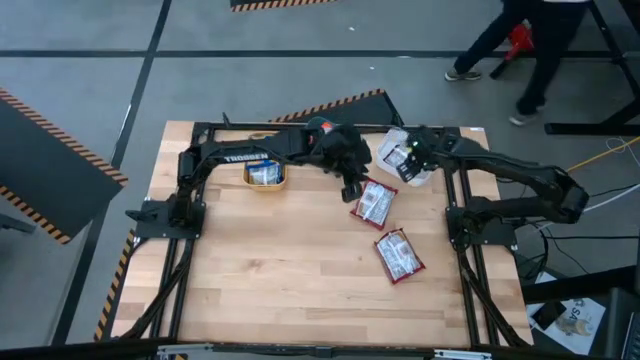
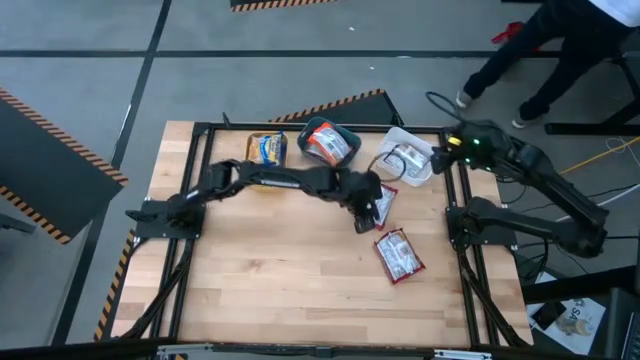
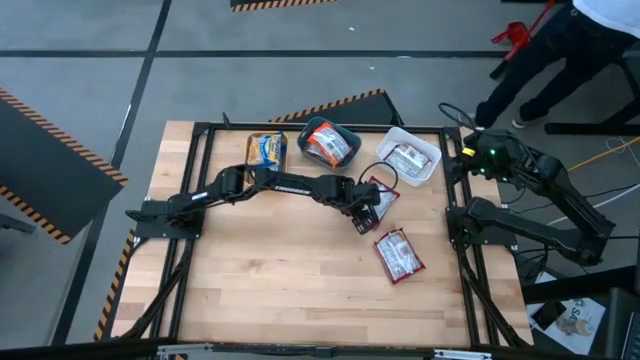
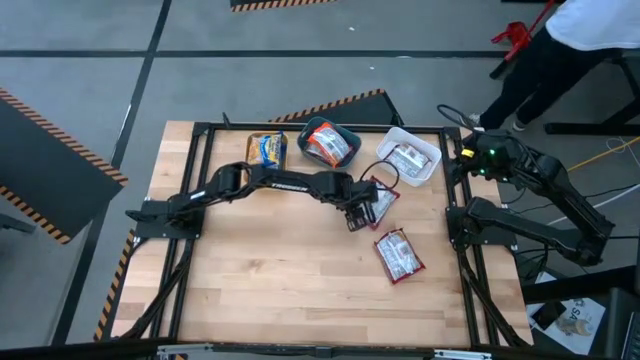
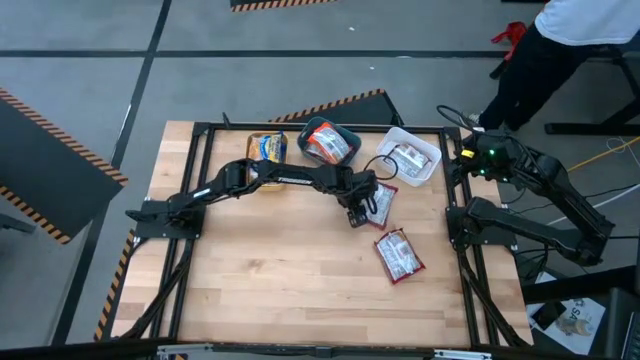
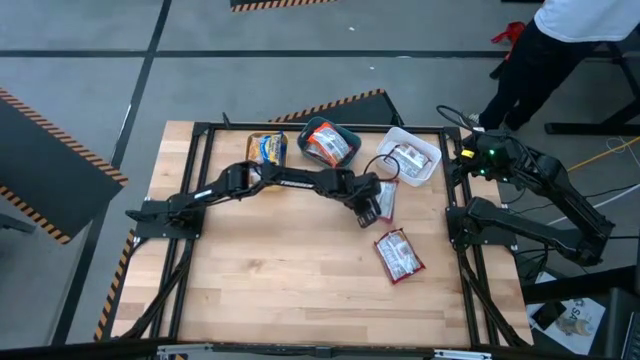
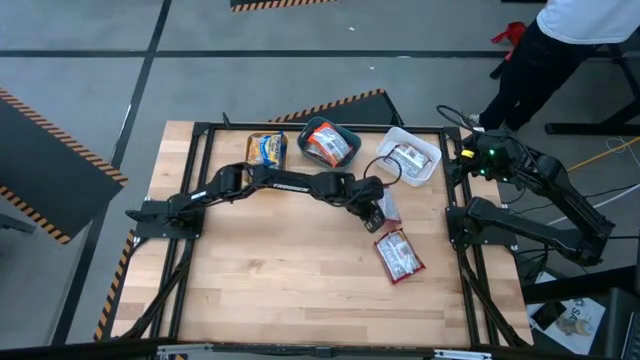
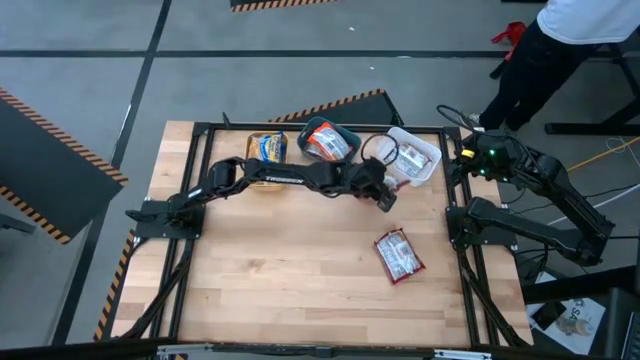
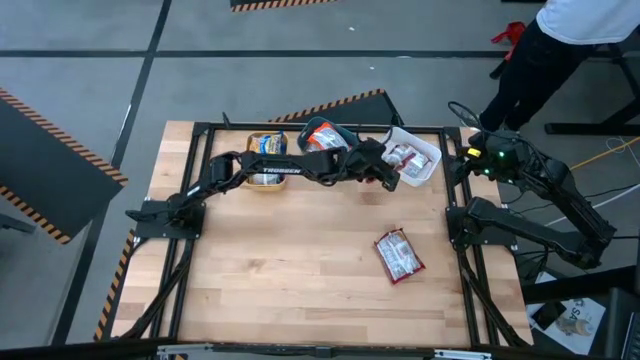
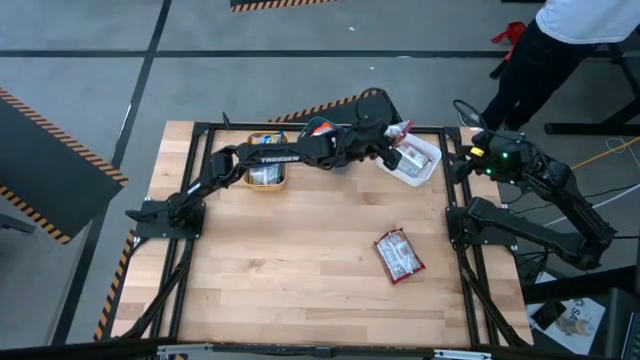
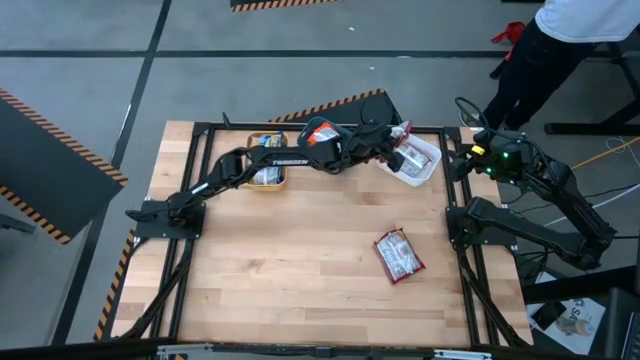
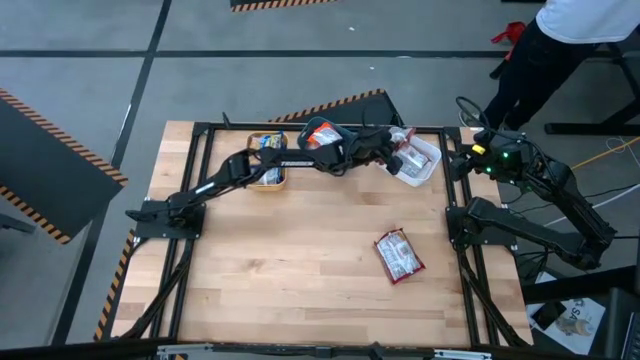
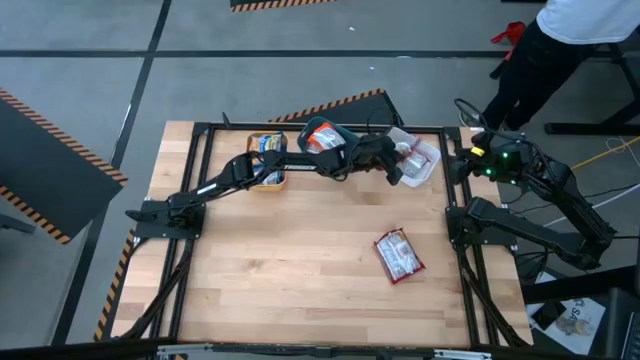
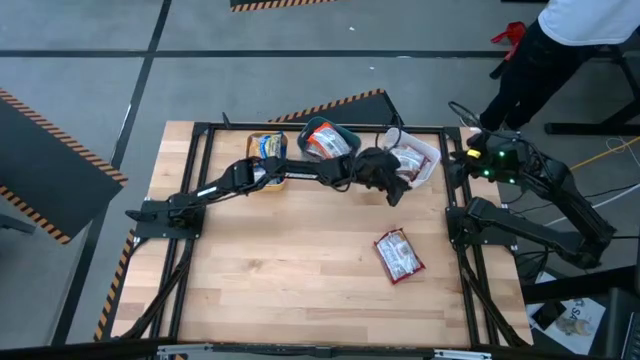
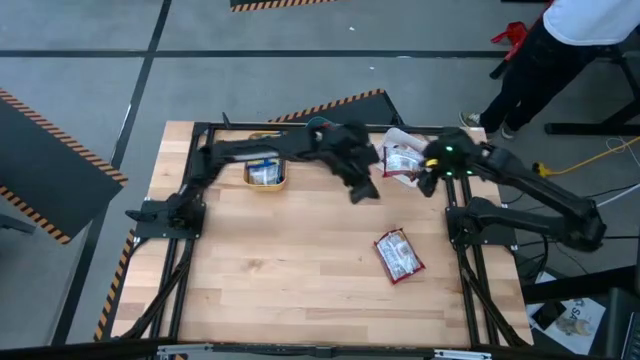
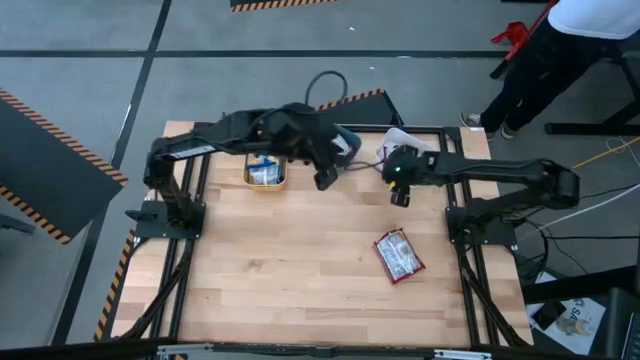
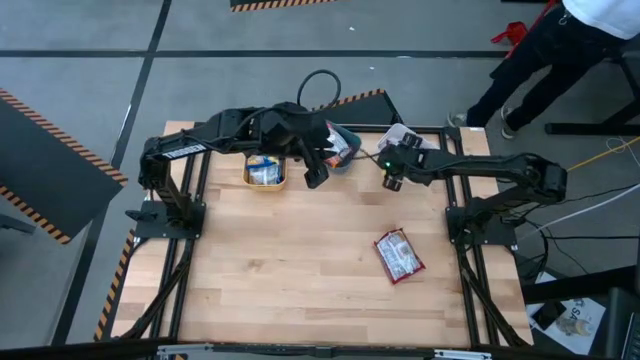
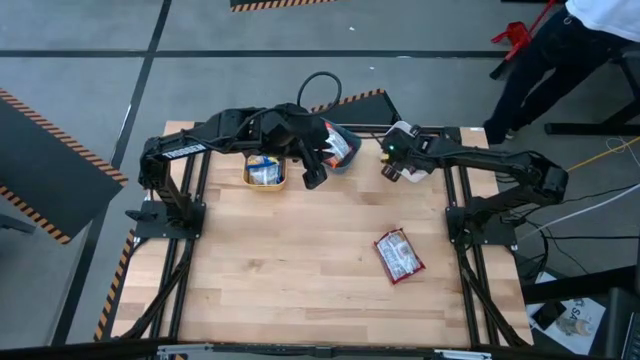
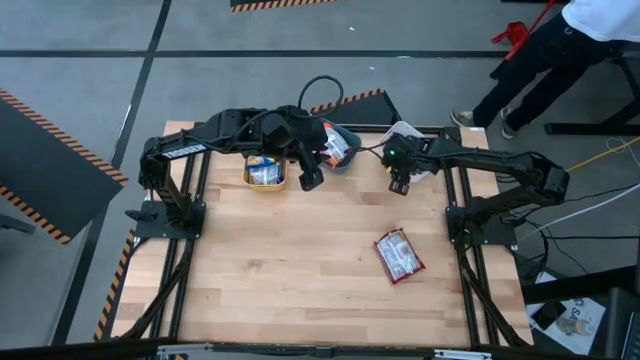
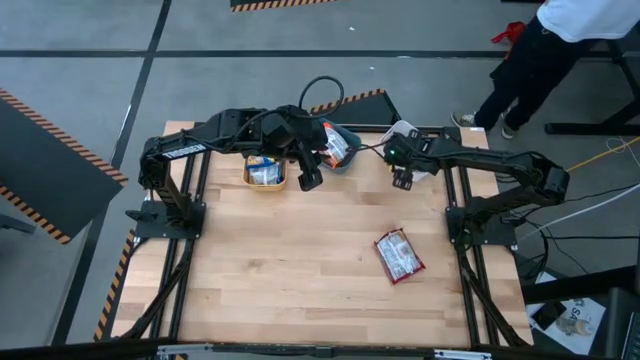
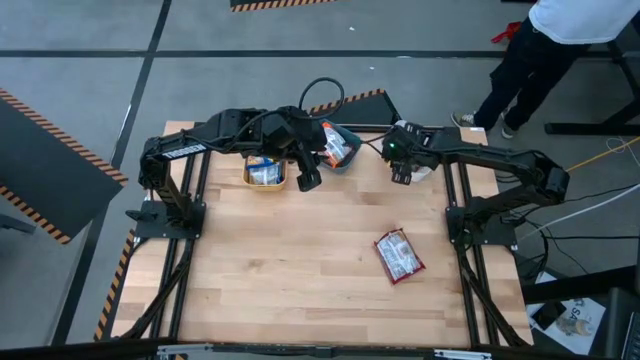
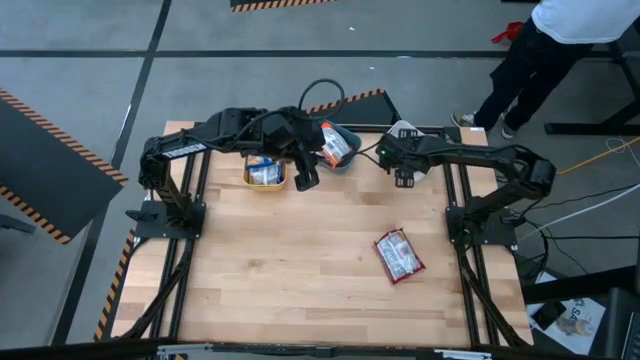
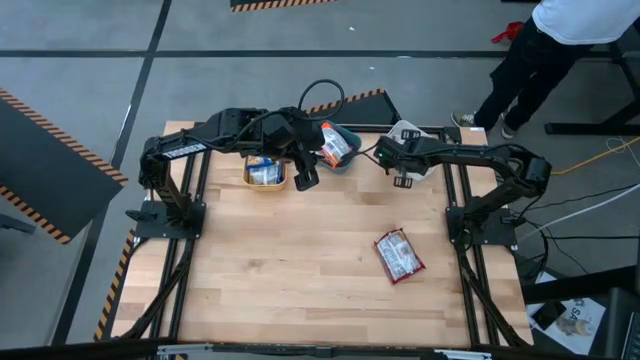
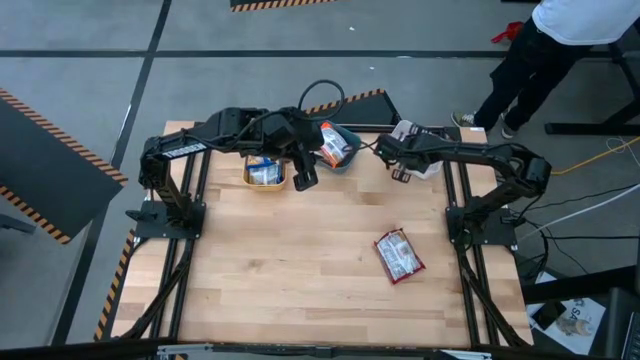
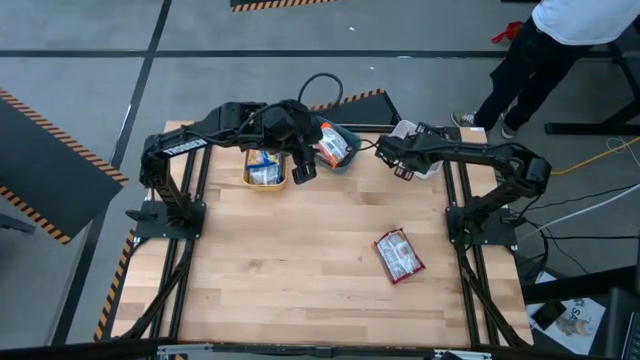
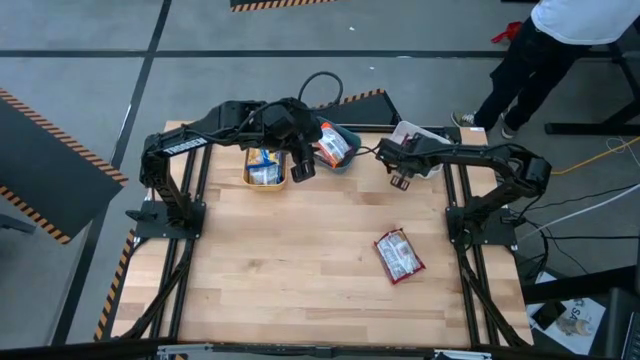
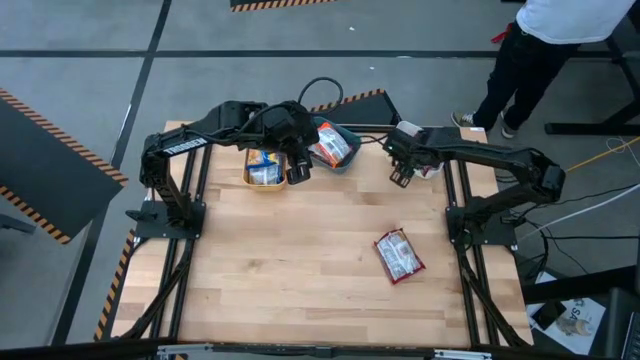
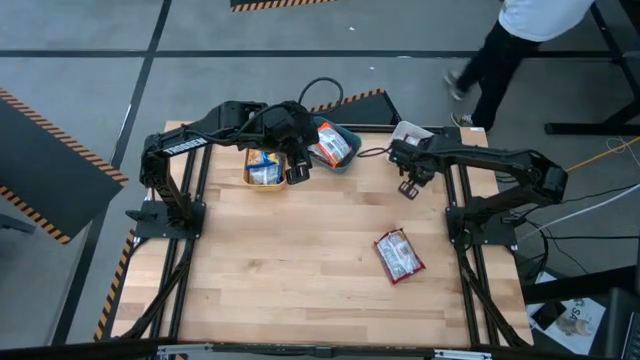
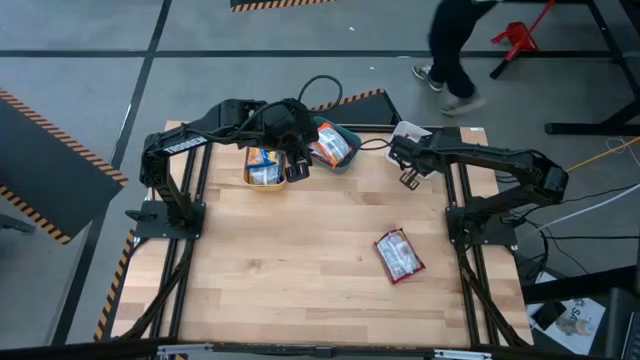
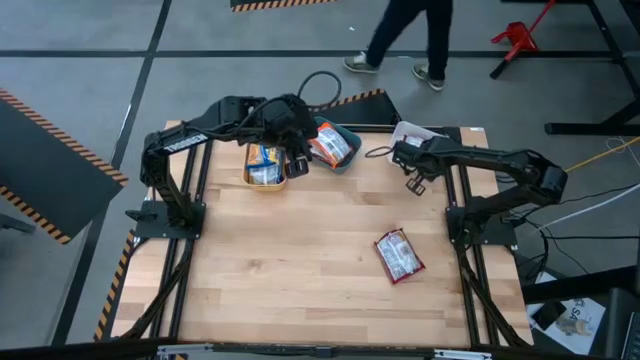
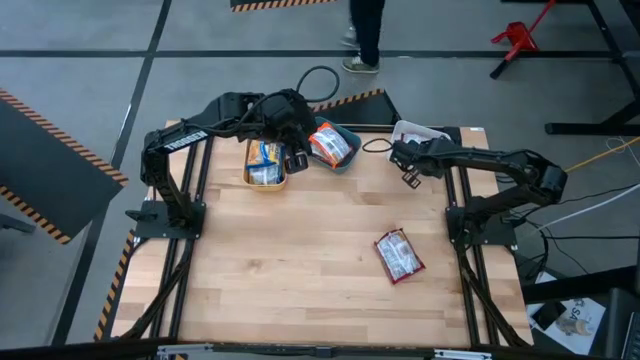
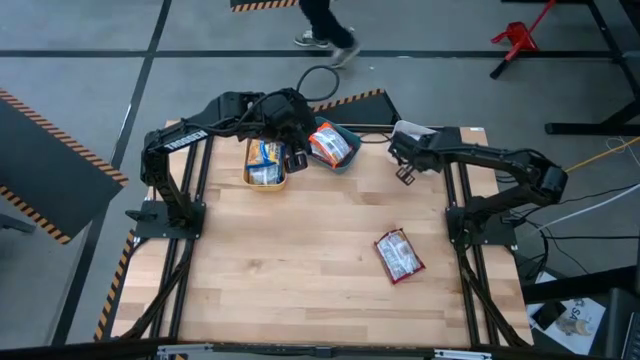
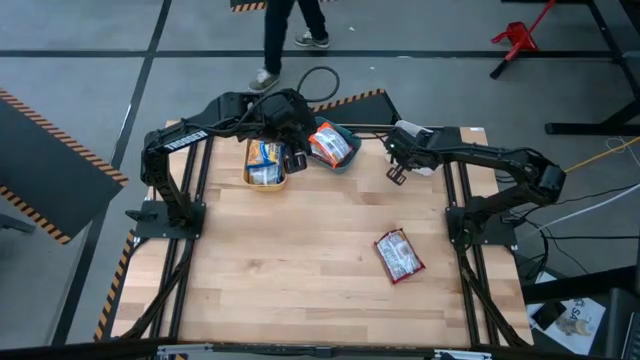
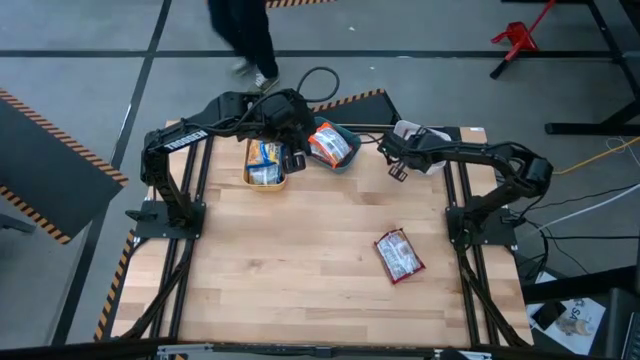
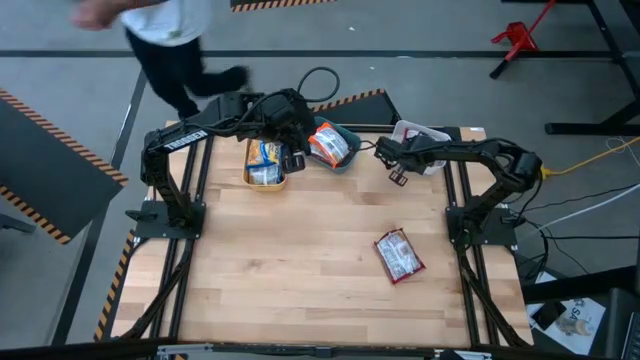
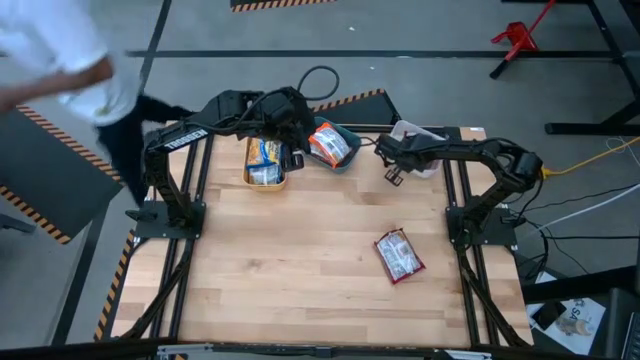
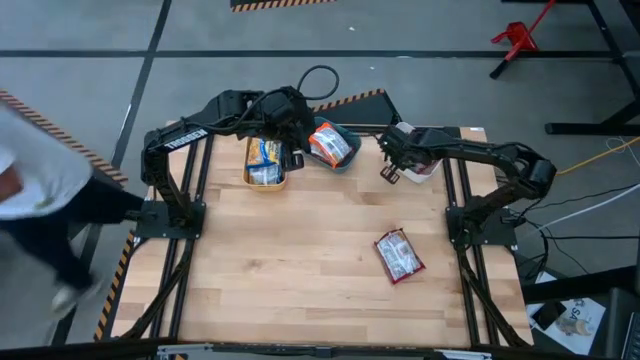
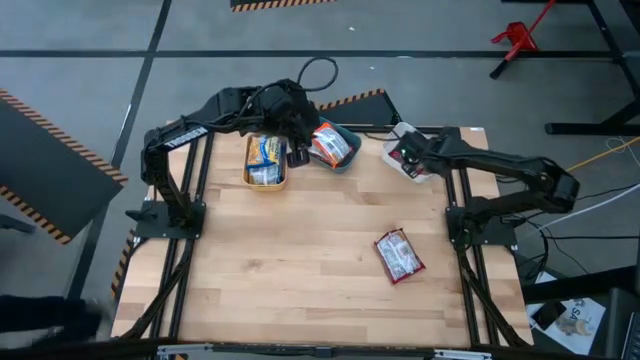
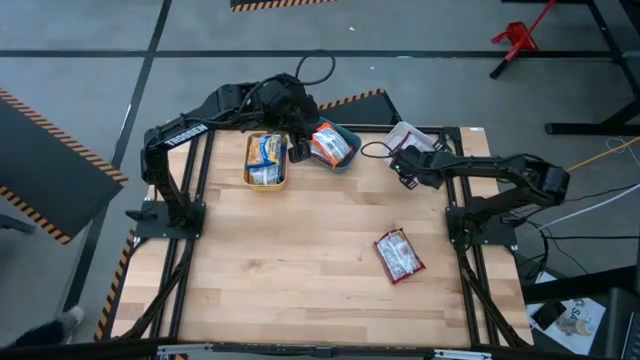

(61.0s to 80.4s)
Task: Sort Maruchan noodles
Put the top red noodle pack into the white bin

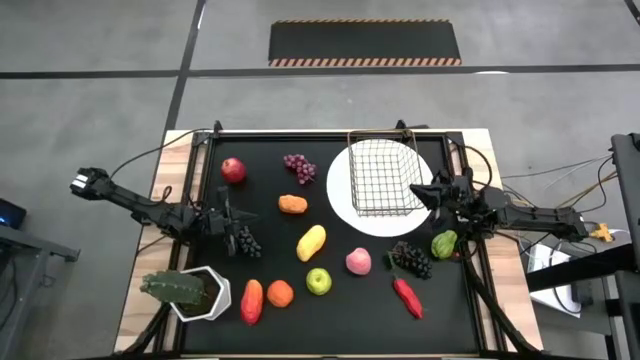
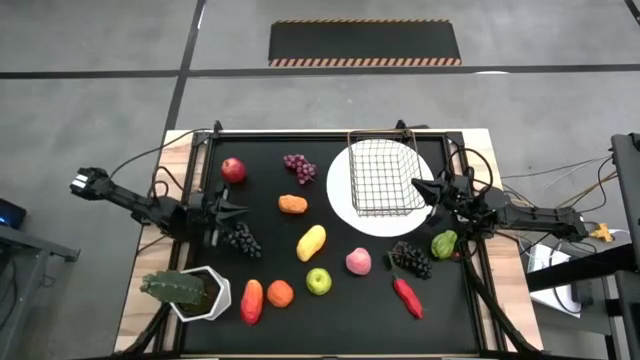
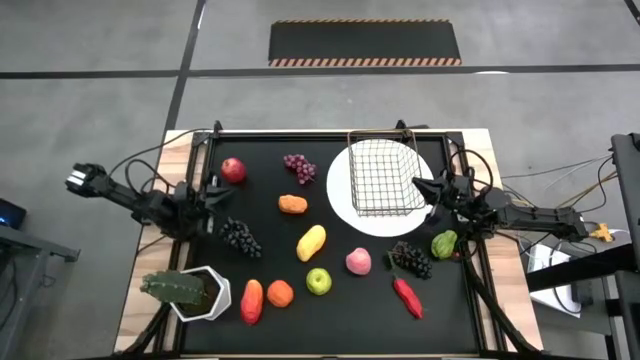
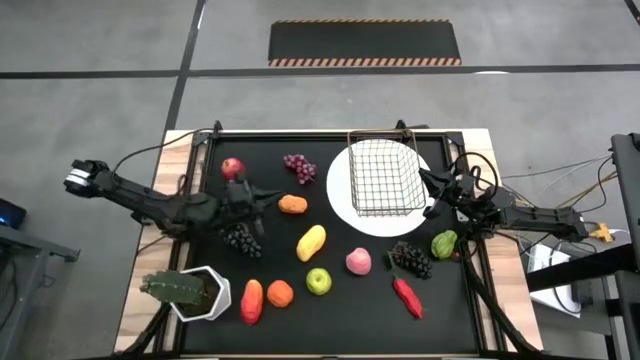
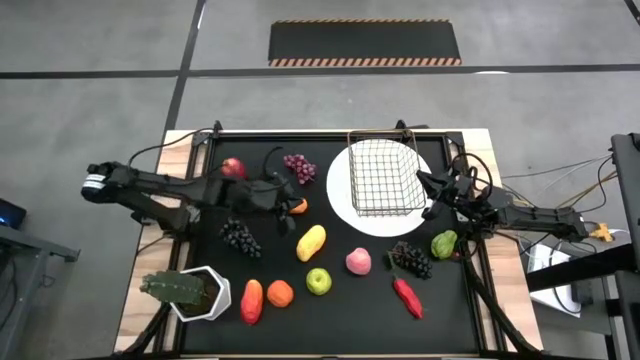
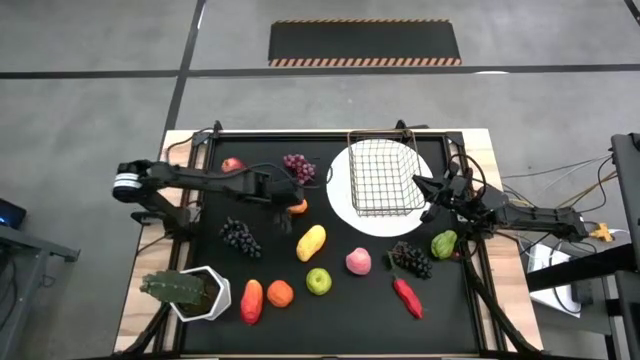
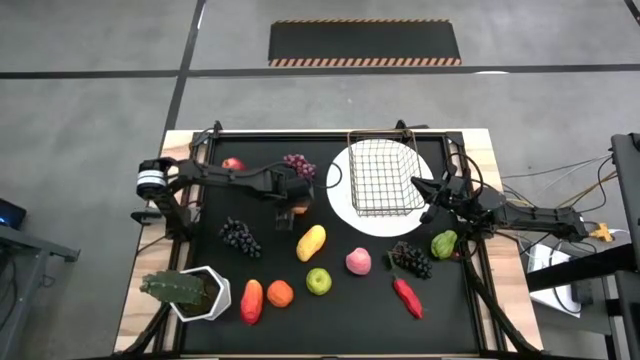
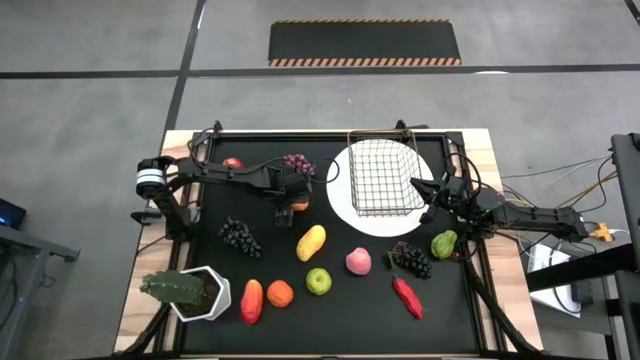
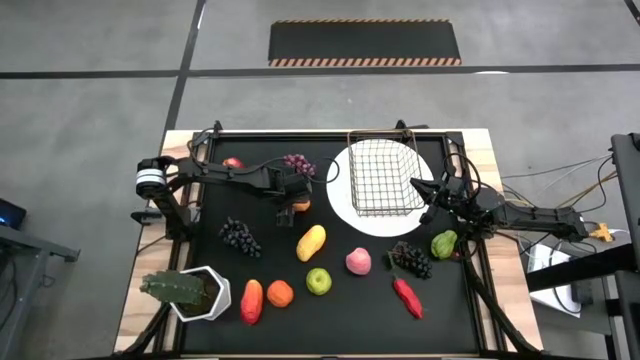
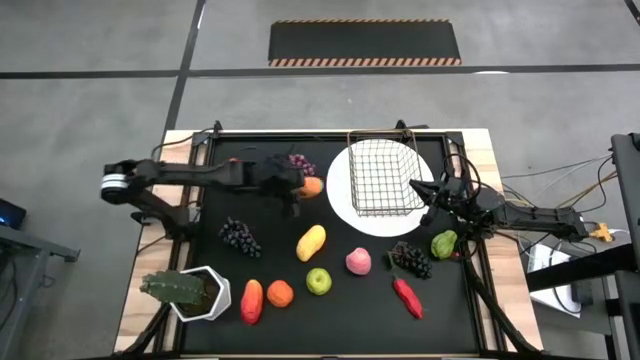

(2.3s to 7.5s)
Task: Build produce basket
Put the orange mango into the wire basket
